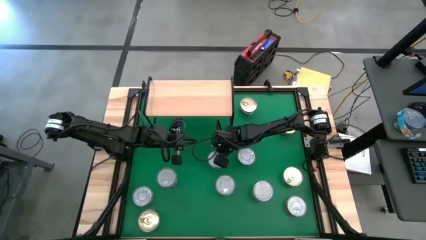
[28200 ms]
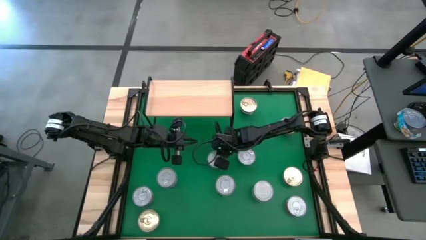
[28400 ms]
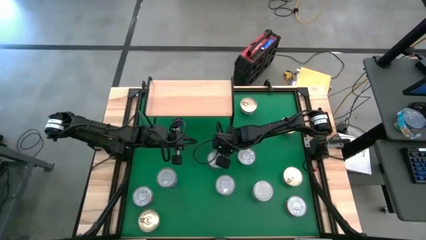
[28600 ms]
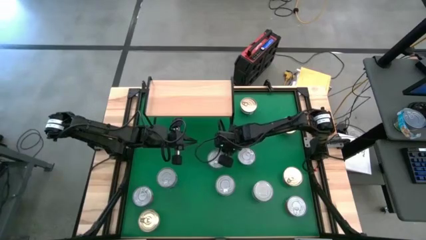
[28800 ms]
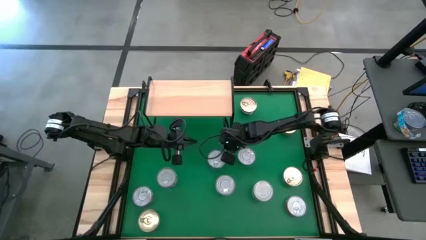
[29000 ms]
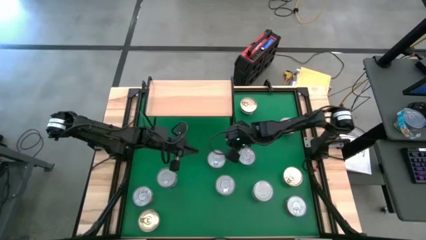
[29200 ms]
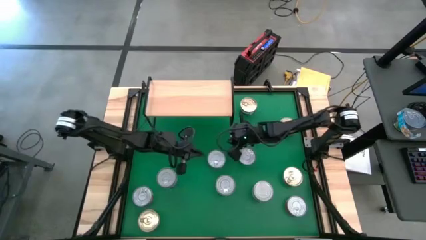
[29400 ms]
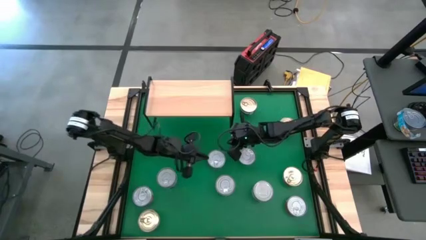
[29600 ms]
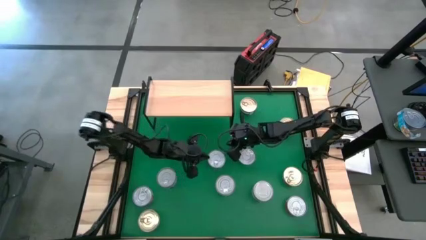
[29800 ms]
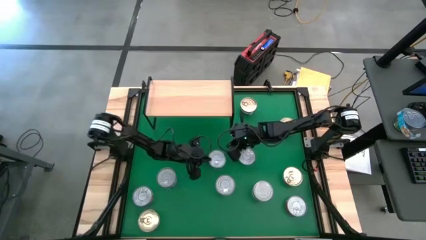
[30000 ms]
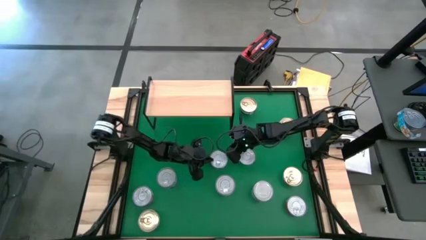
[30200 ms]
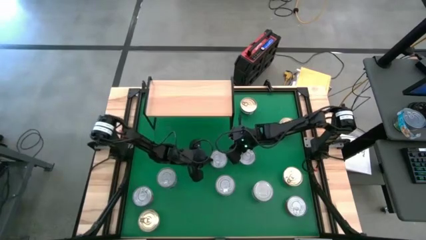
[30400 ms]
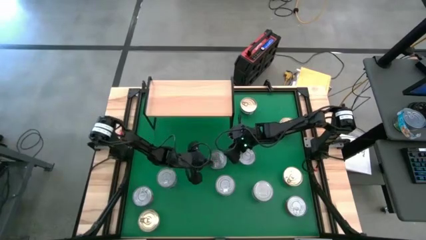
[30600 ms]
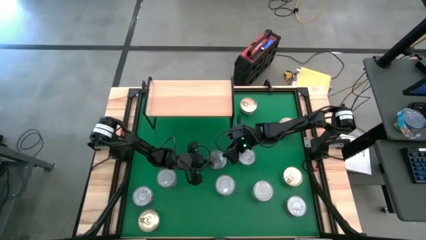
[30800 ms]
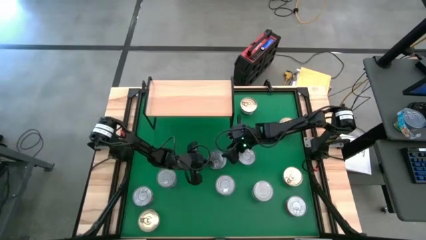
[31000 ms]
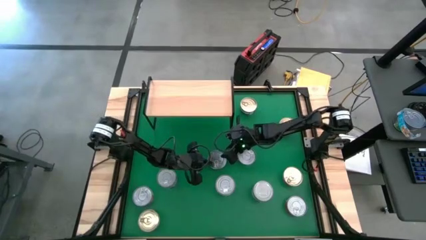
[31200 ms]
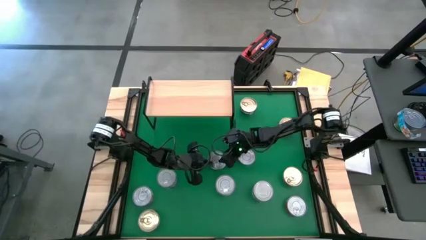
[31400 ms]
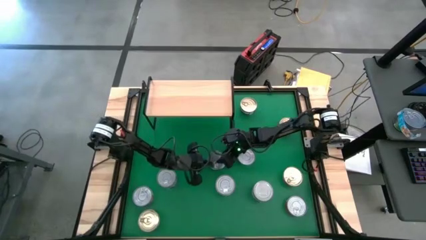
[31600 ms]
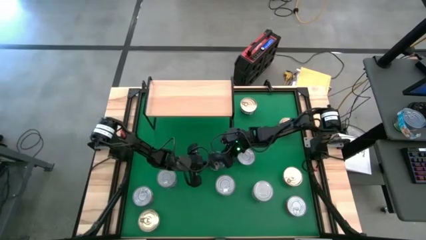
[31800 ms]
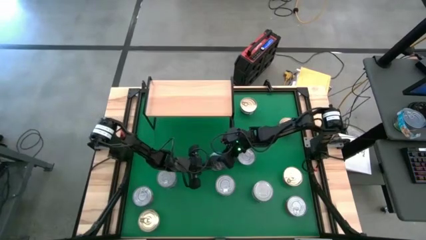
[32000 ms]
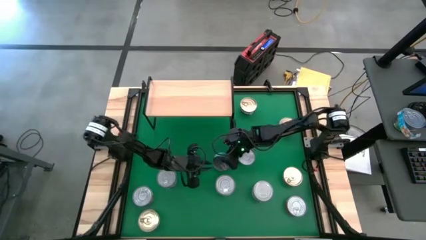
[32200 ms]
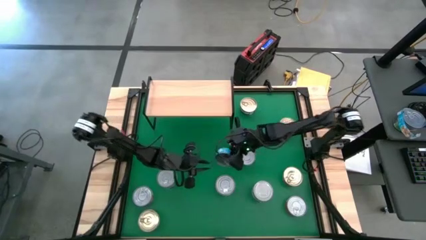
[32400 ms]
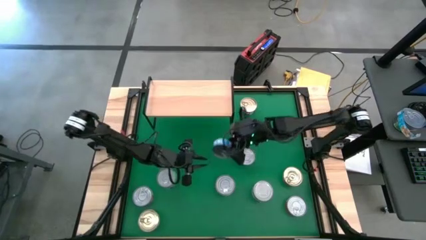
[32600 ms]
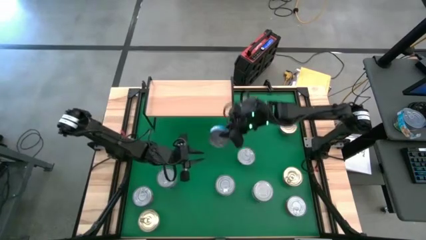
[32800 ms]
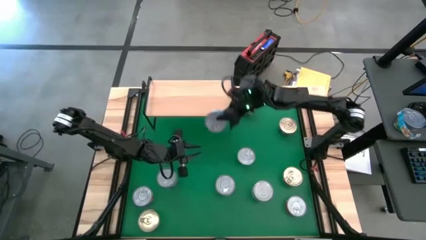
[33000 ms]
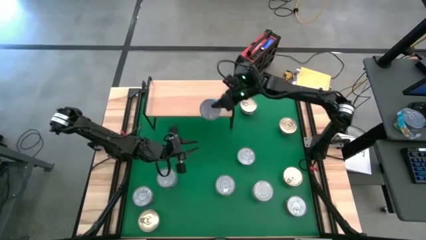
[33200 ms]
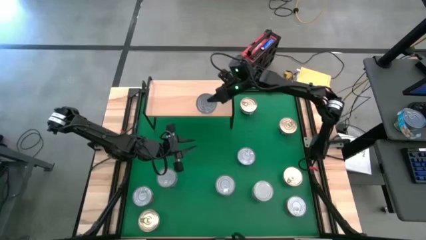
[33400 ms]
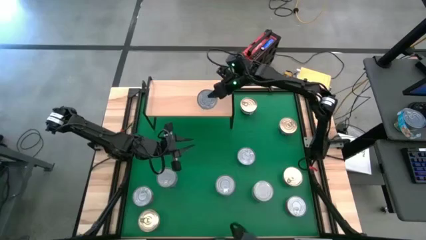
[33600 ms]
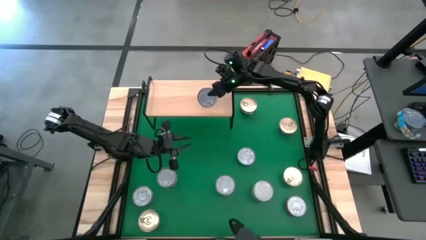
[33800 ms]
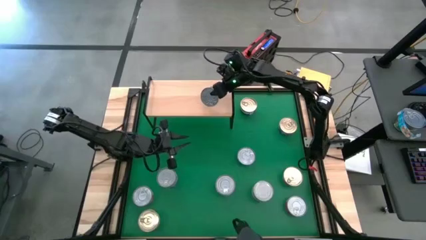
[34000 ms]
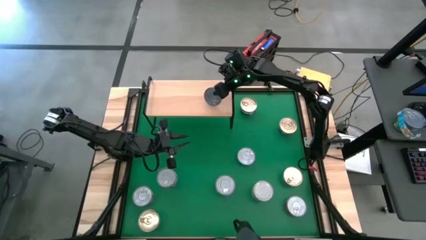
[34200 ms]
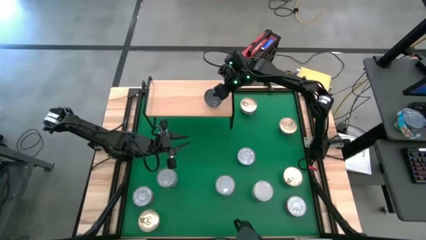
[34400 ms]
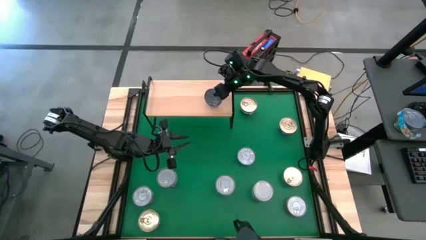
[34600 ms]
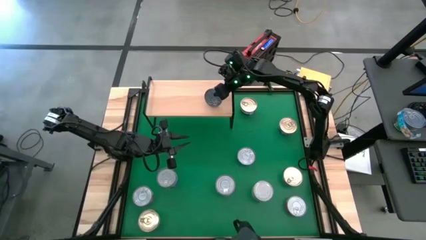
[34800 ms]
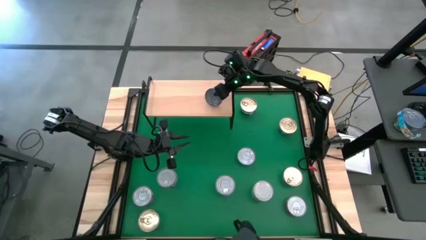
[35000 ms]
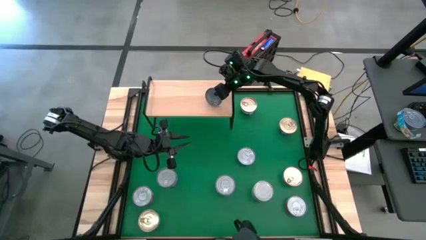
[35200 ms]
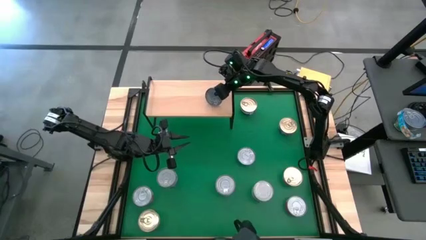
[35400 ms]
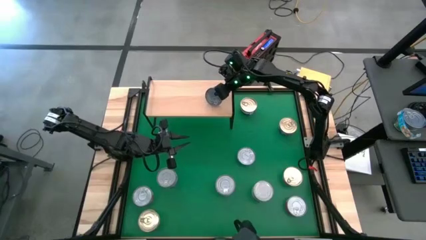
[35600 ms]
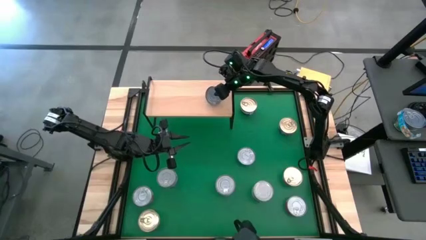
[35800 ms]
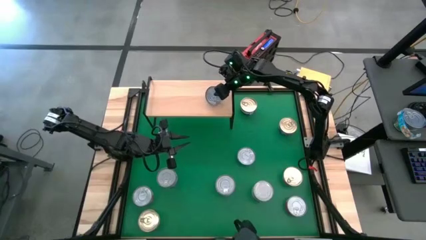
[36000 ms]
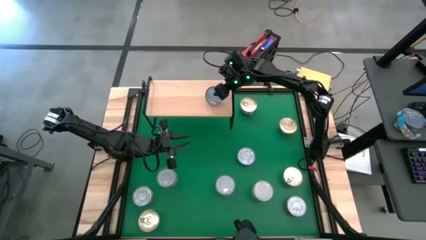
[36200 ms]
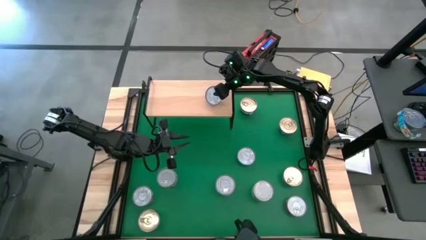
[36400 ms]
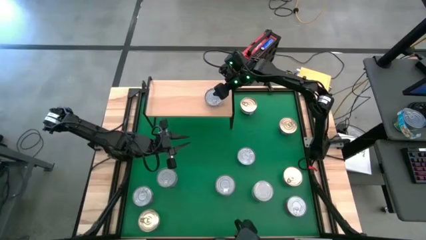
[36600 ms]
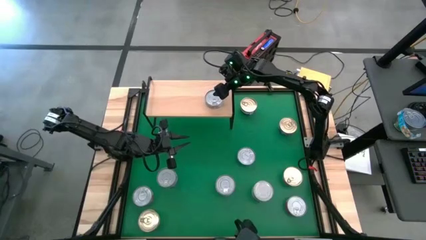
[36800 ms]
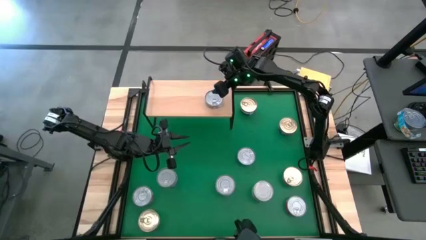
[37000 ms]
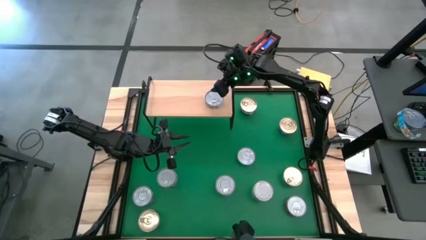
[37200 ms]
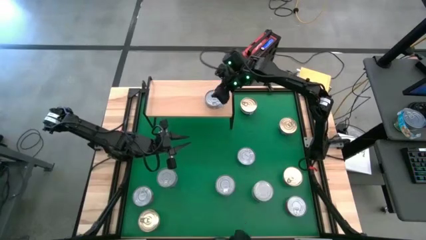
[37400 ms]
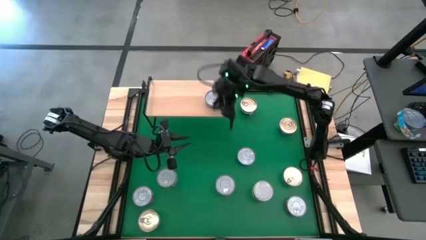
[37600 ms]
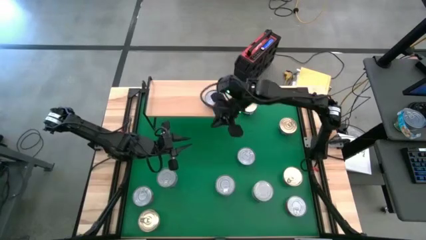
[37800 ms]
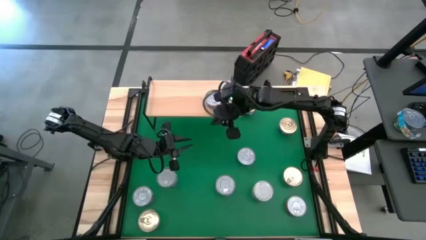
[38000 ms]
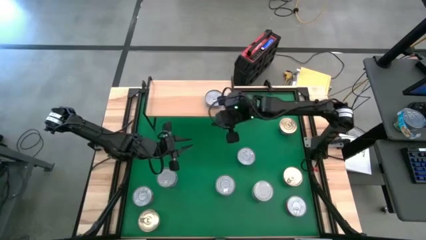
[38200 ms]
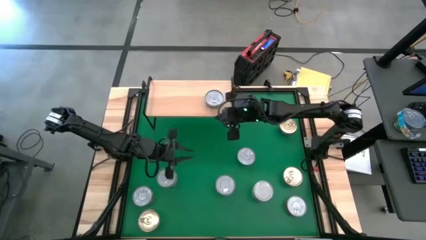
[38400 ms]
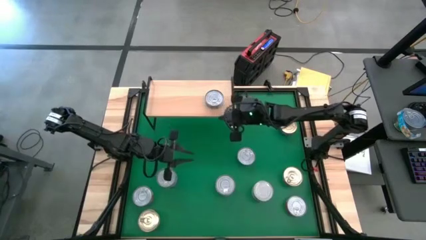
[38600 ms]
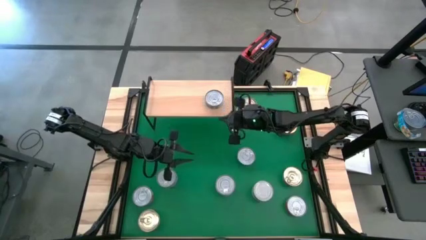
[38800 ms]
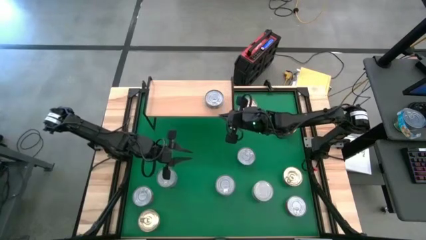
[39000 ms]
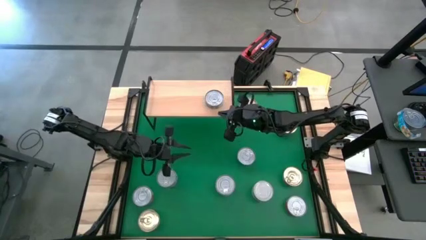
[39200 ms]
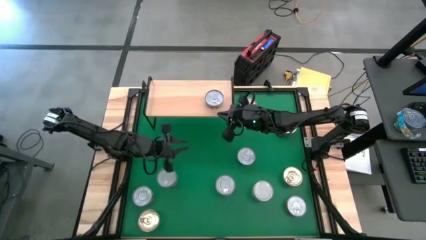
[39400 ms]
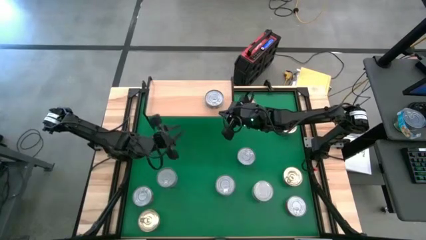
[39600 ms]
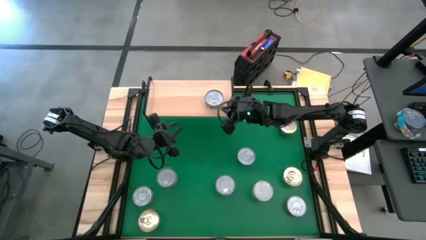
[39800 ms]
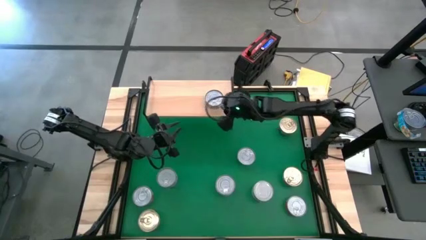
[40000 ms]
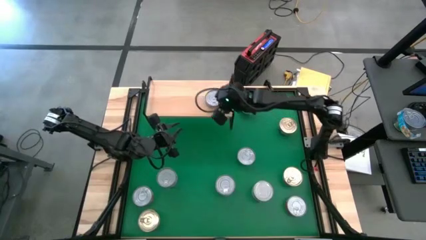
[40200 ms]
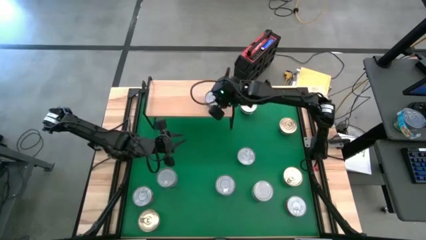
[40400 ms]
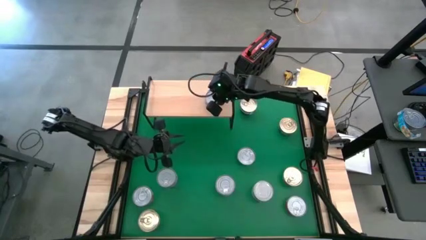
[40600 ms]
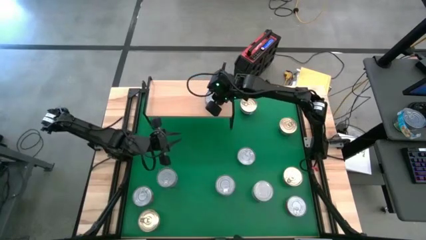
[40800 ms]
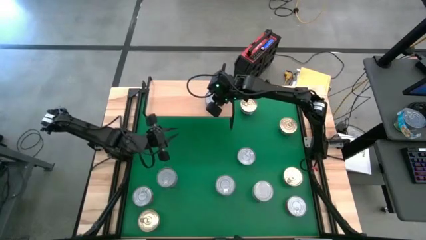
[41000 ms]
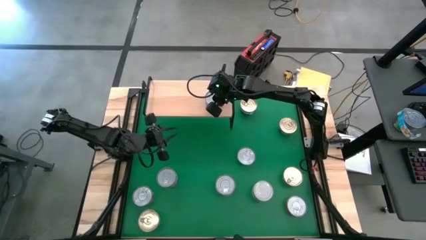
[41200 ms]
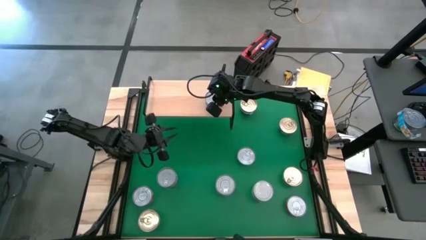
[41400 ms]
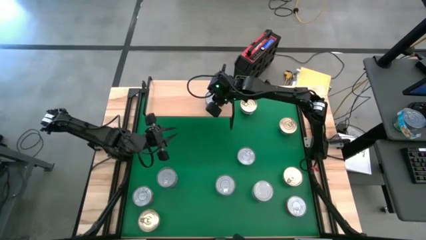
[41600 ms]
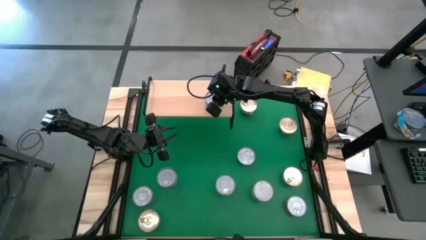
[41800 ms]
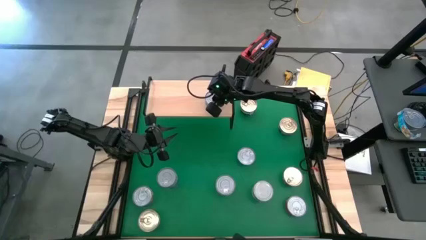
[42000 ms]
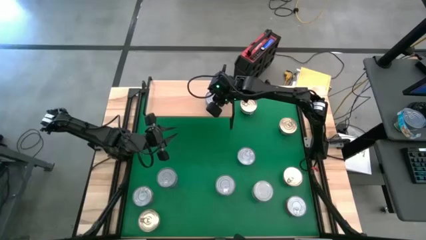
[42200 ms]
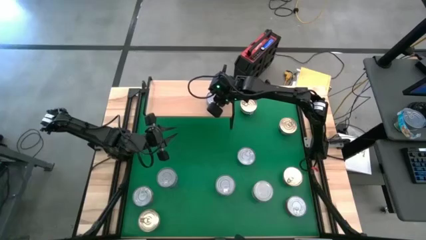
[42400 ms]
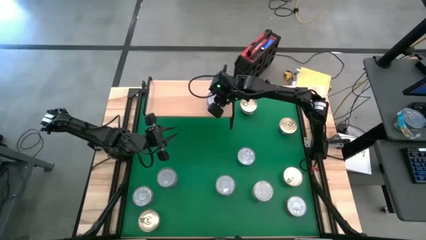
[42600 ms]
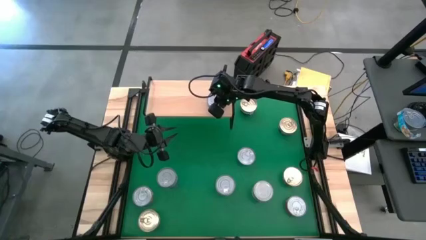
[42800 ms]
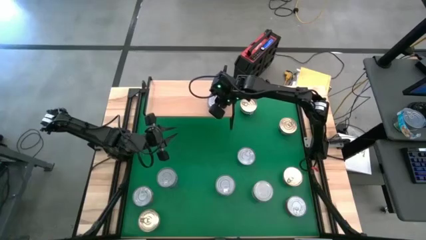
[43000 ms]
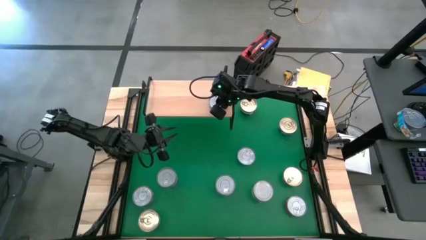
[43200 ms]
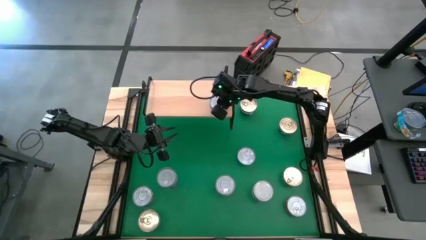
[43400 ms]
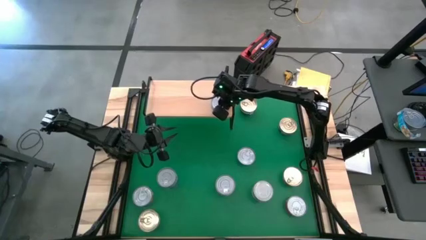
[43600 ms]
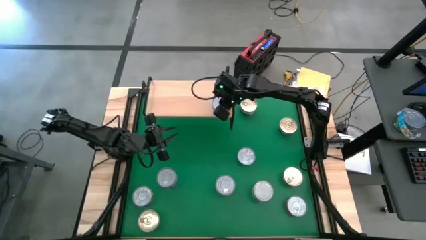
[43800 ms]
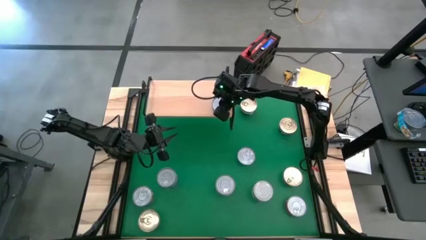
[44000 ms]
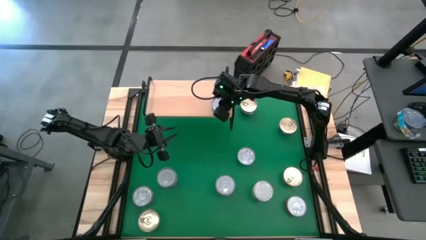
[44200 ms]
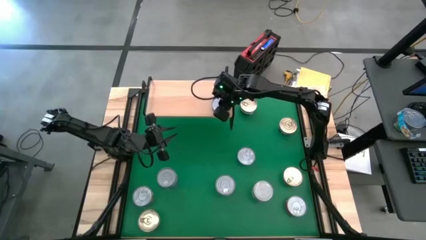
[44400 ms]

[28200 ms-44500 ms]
Task: Stack canned seafood by type on shelf
Put the top right blue tuna can on the shelf
